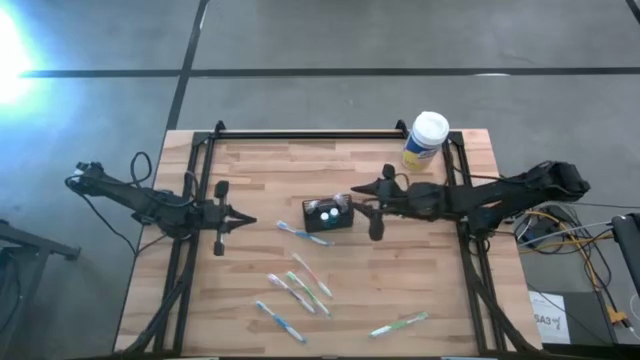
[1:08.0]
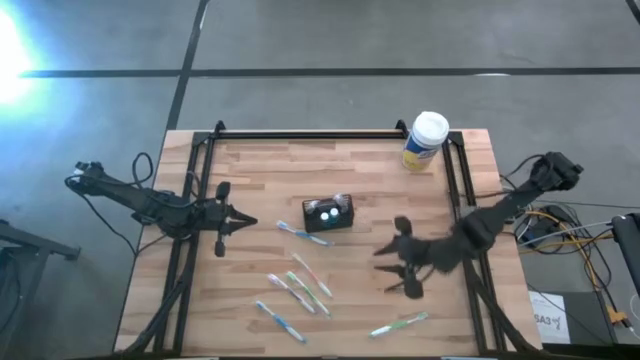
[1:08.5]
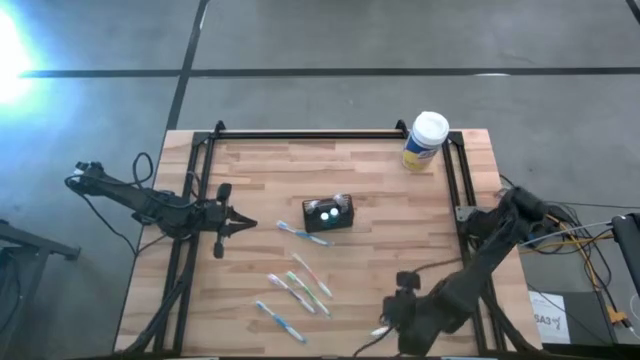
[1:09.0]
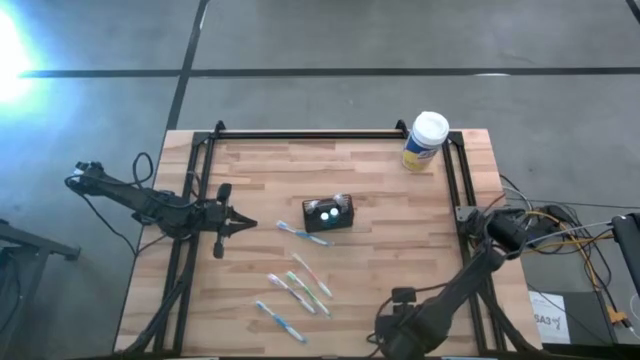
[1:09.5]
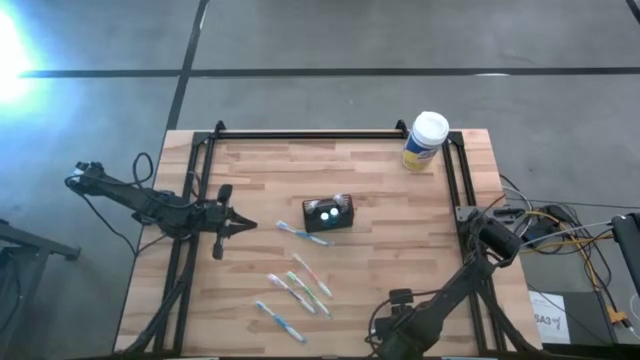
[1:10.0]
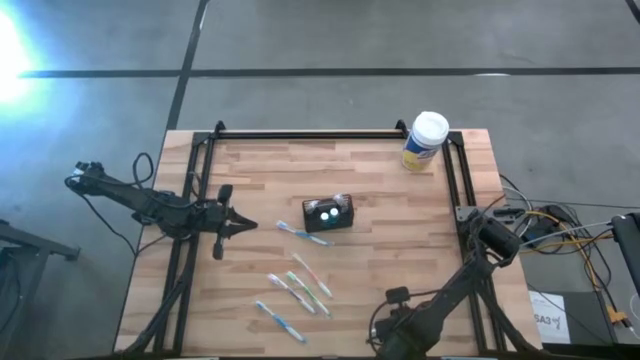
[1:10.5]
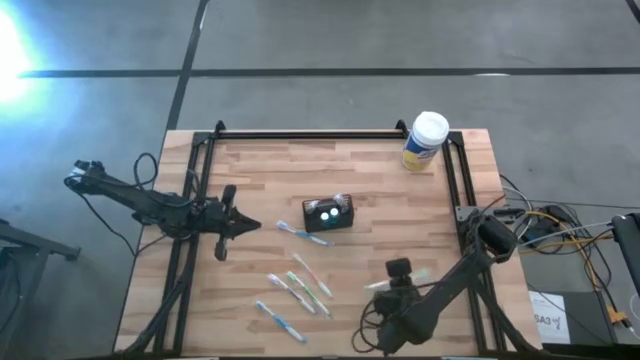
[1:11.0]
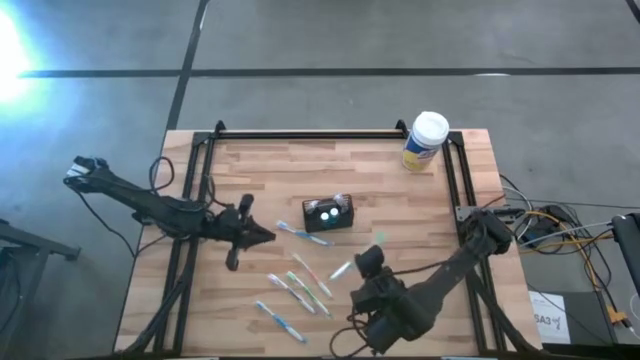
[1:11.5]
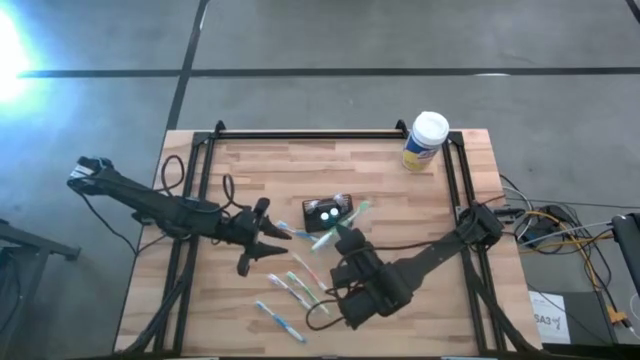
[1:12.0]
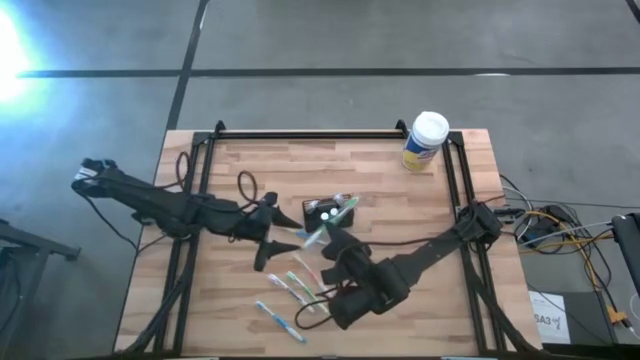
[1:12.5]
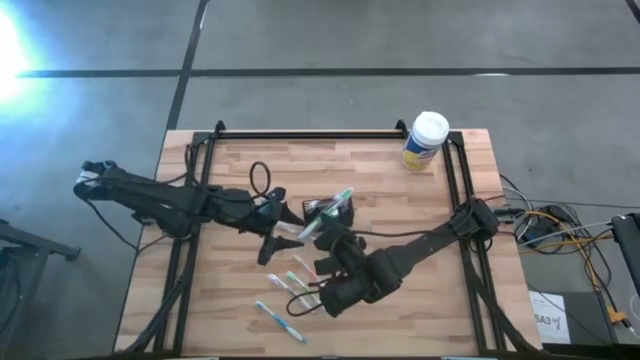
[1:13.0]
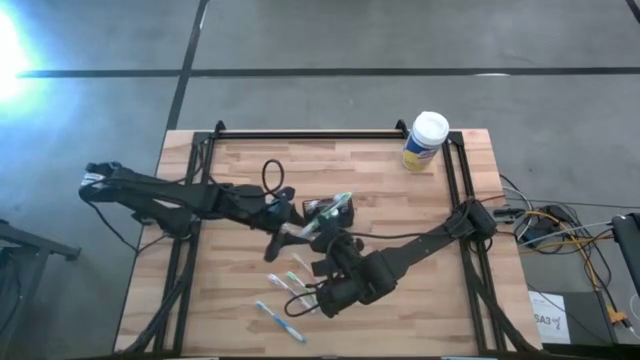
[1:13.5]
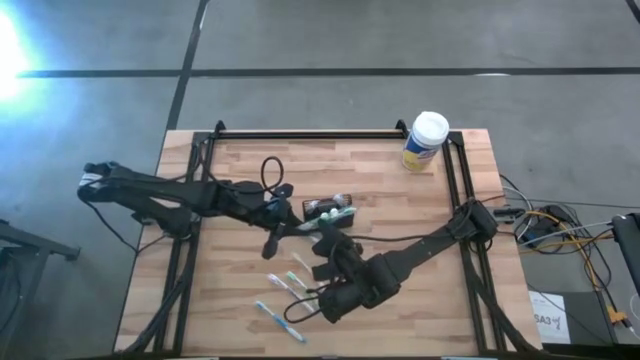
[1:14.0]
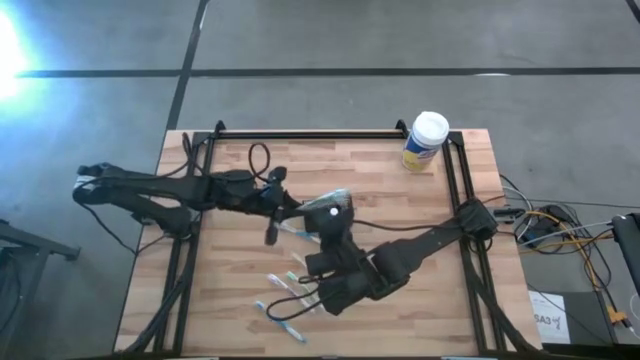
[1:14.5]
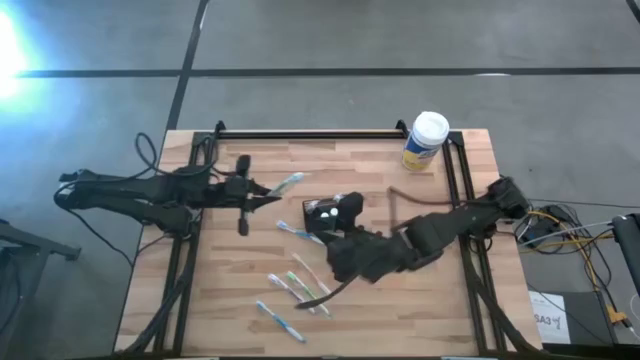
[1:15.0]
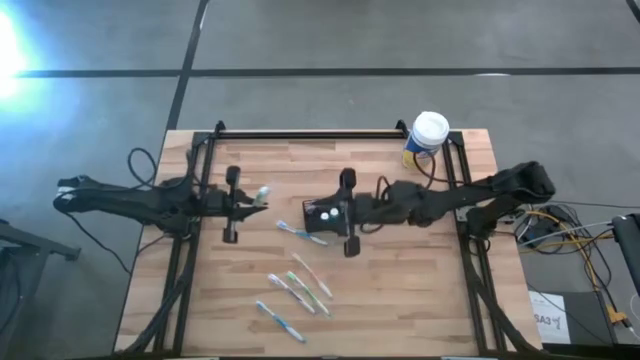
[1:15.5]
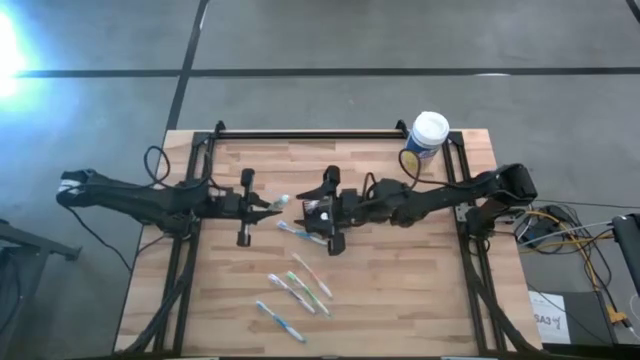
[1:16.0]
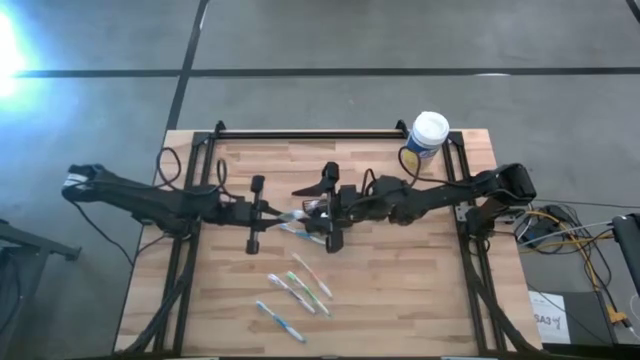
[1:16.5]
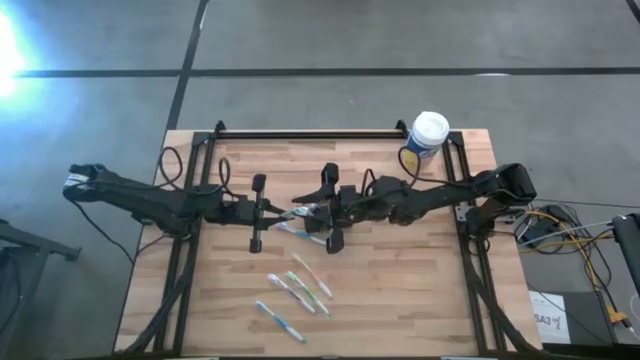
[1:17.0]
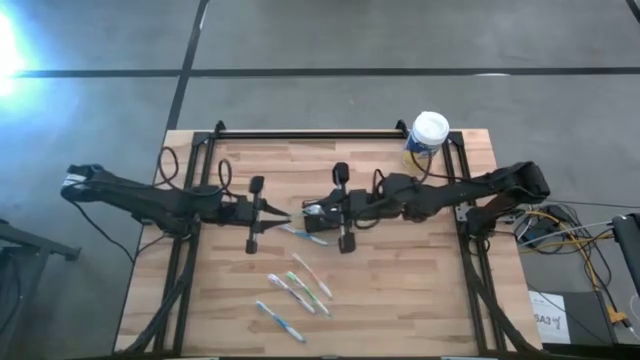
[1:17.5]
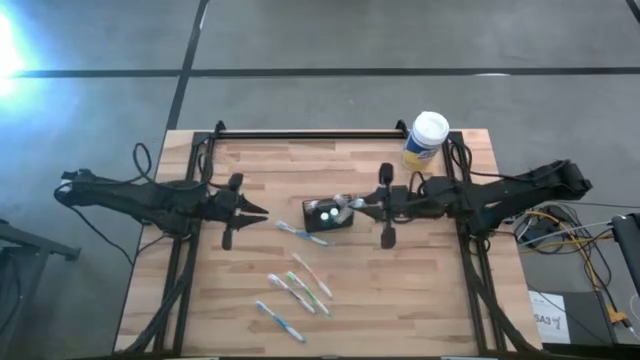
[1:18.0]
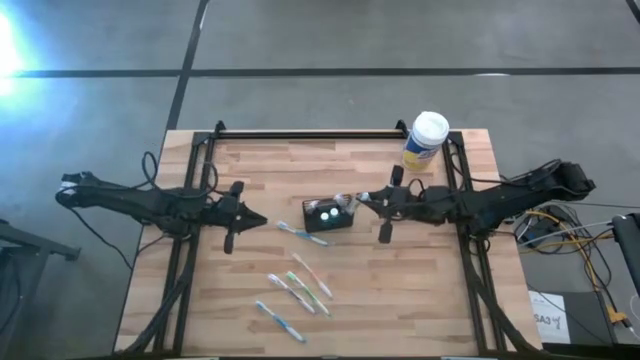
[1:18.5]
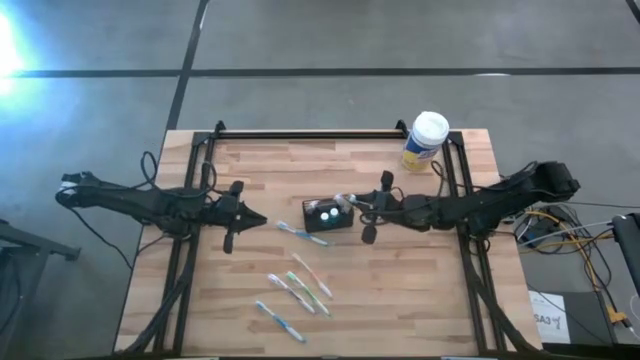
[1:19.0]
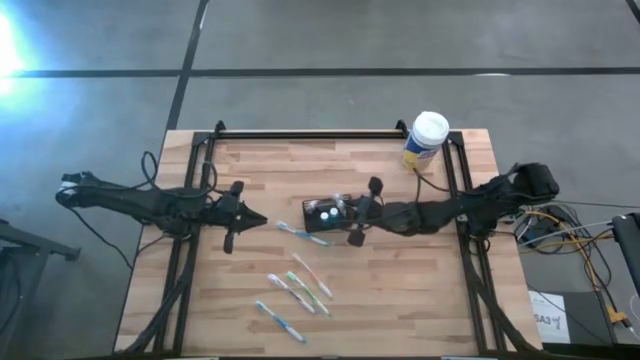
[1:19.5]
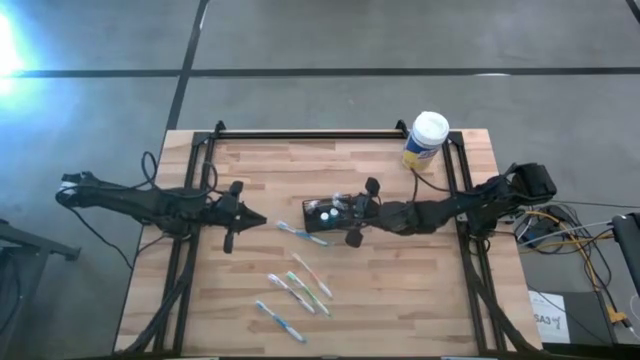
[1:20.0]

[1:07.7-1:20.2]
Task: Pick & Place toothbrushing station
Put the bottom green toothbrush into the black wire organizer

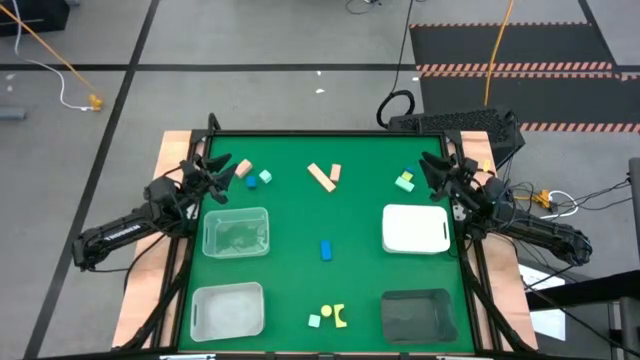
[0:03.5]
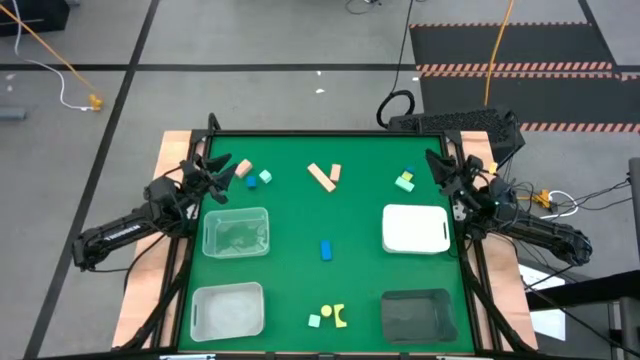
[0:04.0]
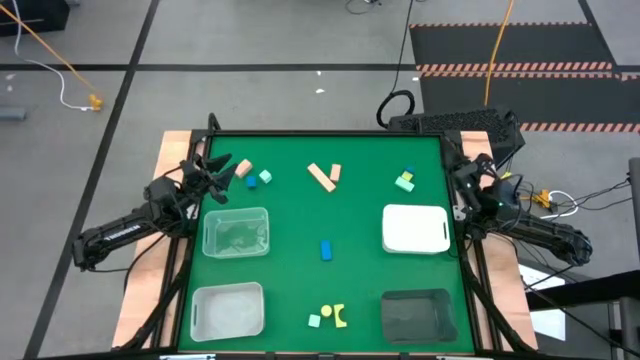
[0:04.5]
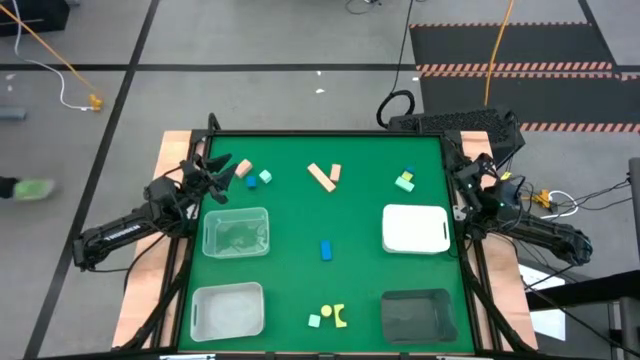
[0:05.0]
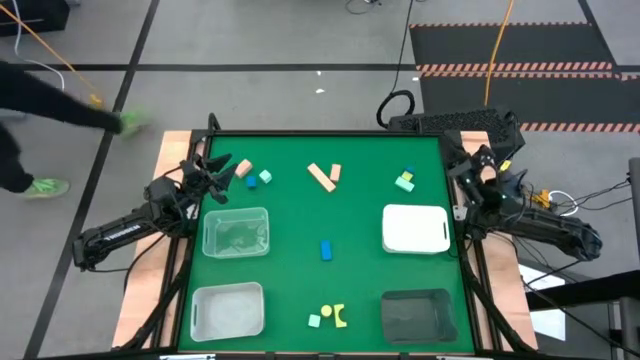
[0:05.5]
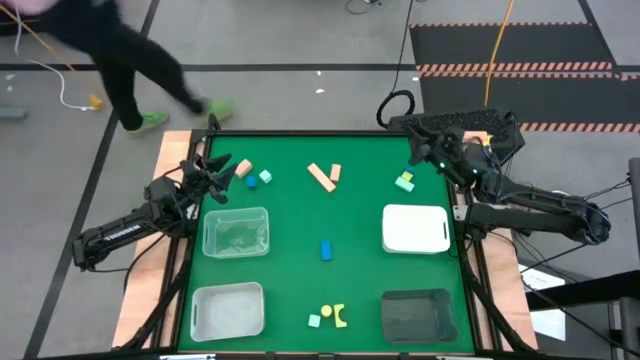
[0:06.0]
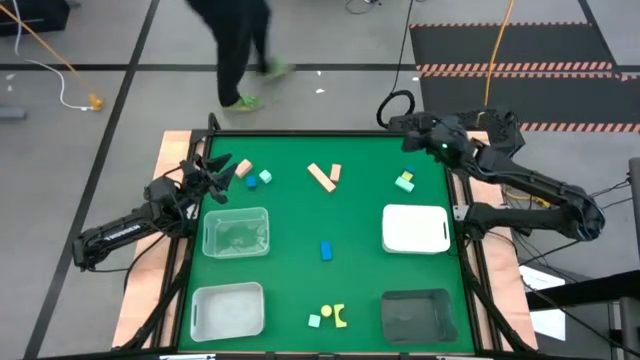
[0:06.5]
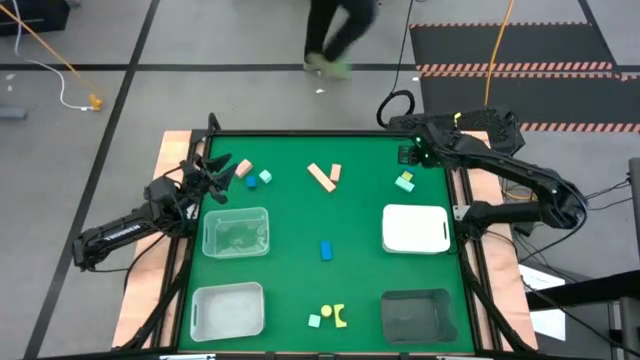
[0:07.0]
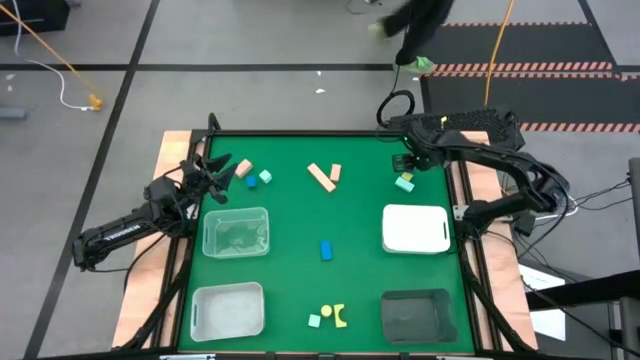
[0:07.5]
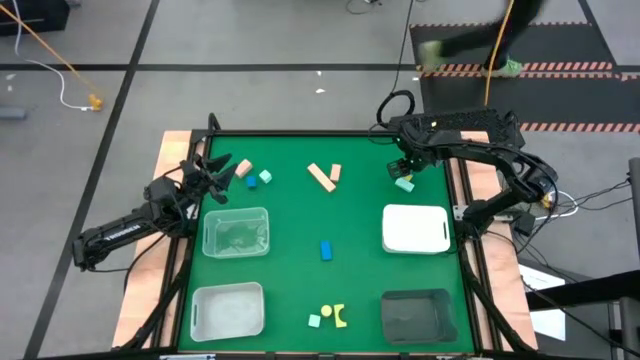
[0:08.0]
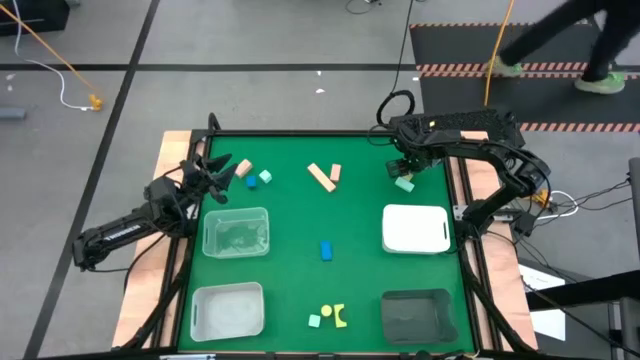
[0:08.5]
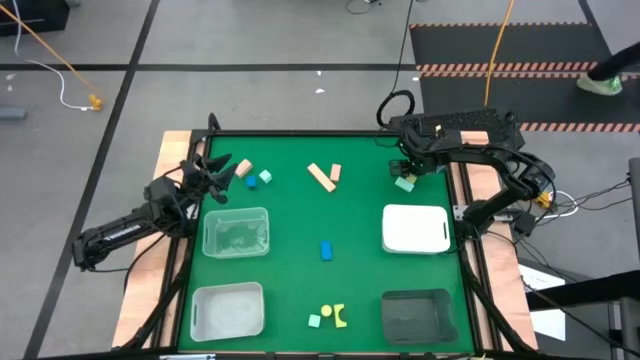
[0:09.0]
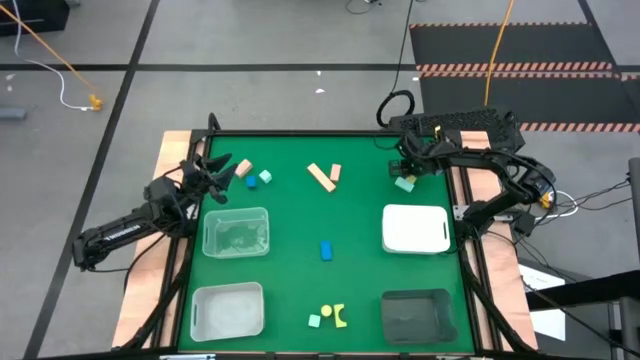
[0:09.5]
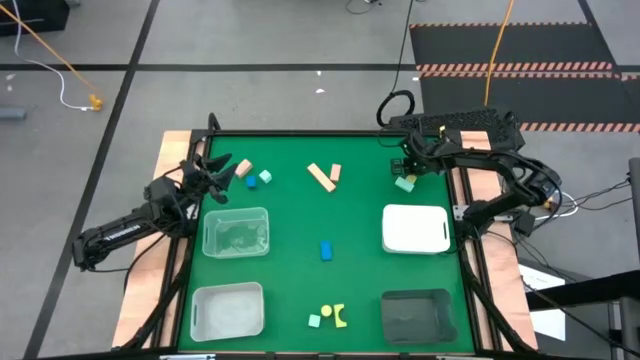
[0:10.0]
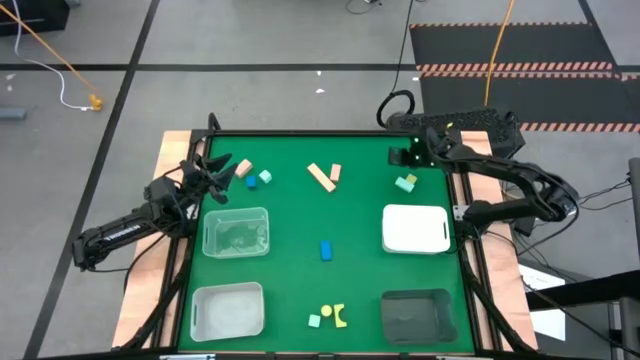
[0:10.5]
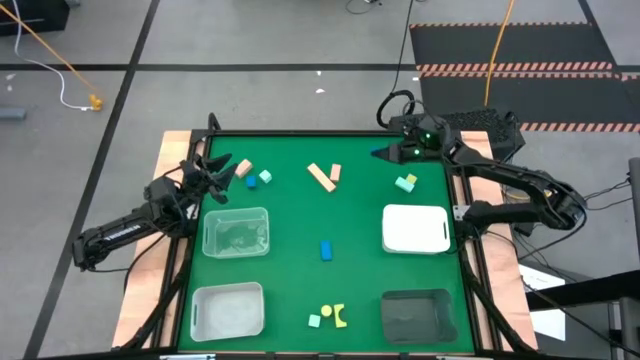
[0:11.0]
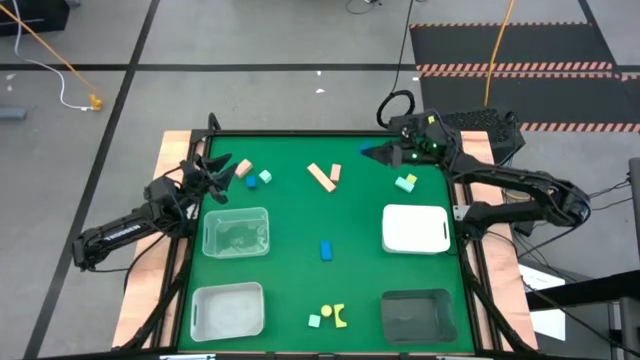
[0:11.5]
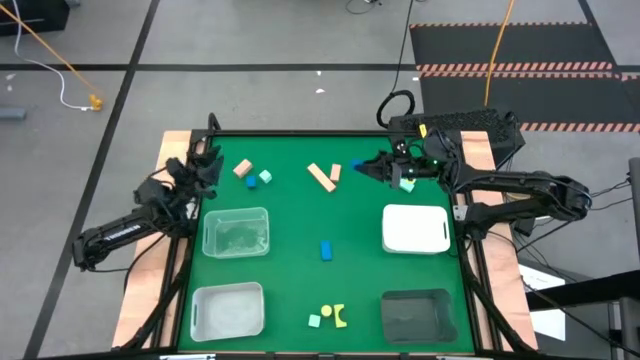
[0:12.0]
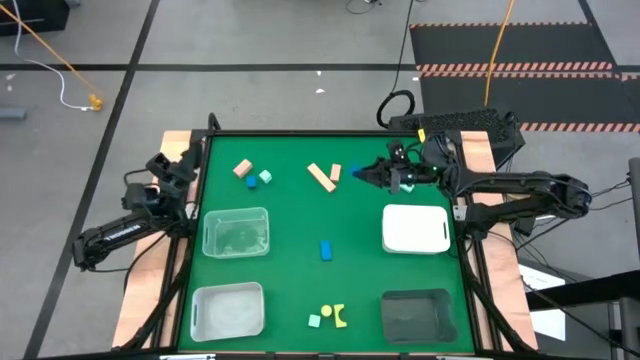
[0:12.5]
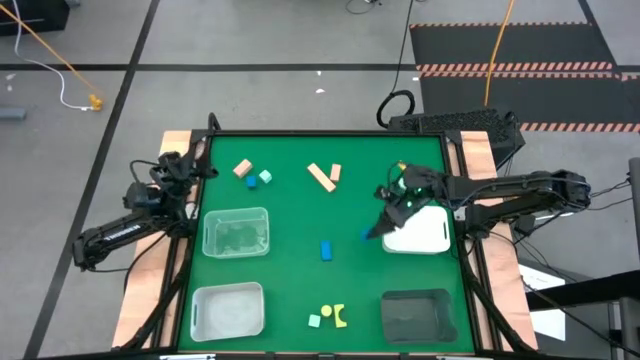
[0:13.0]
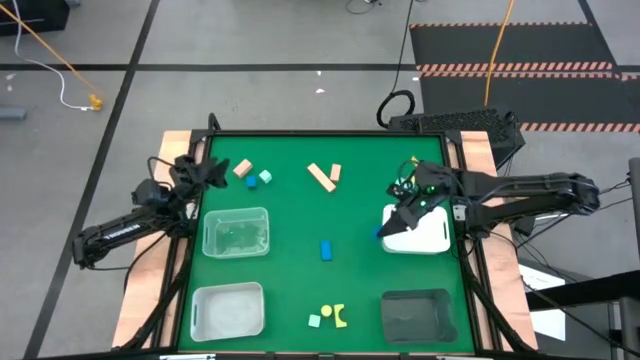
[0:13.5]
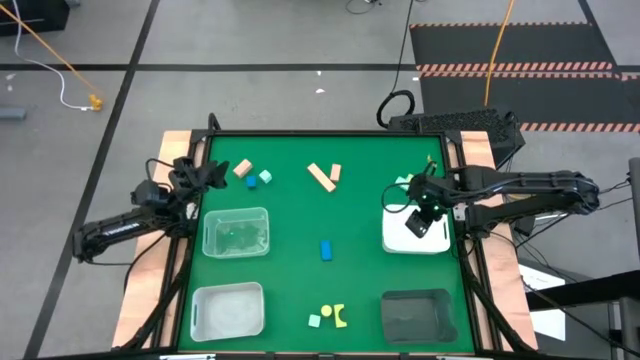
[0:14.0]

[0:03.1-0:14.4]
Task: Sort & place blocks by color
Put the top right blue block into the white bin
